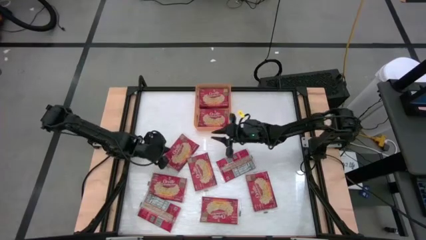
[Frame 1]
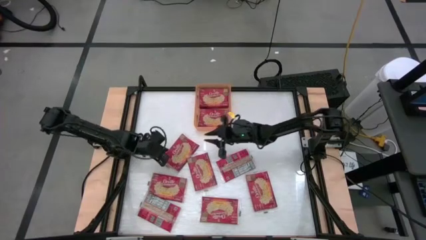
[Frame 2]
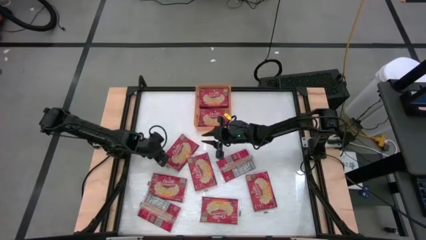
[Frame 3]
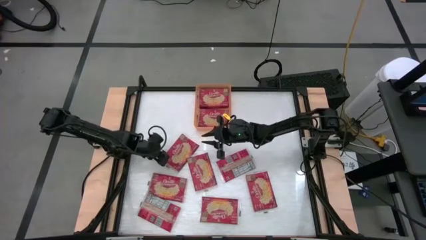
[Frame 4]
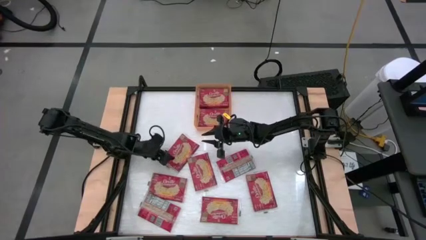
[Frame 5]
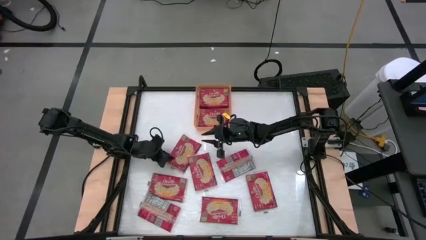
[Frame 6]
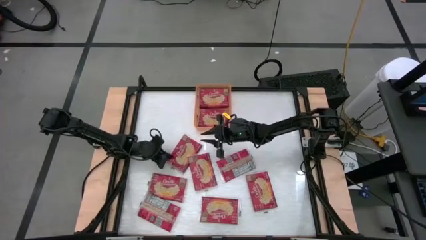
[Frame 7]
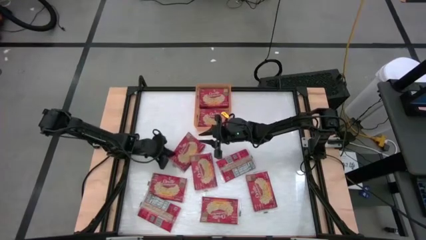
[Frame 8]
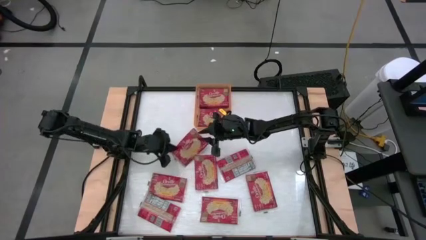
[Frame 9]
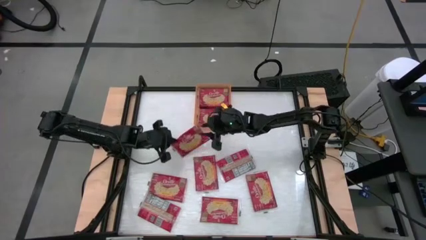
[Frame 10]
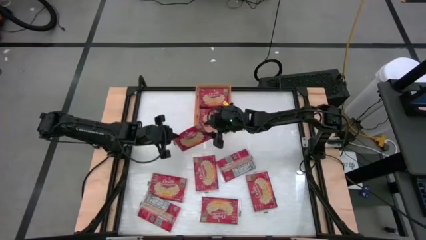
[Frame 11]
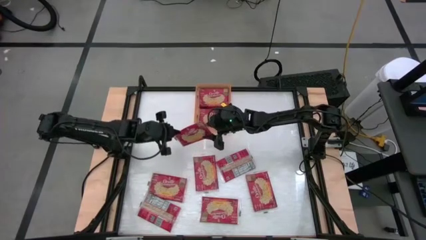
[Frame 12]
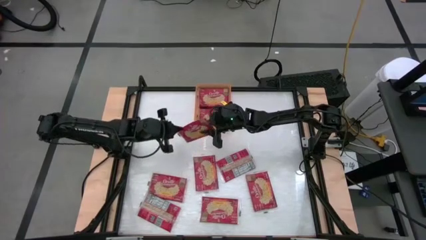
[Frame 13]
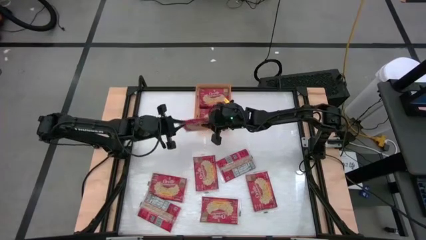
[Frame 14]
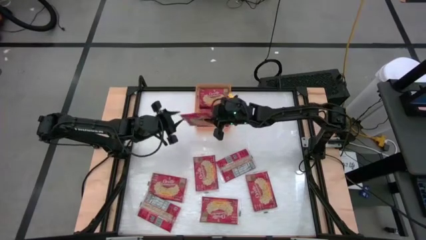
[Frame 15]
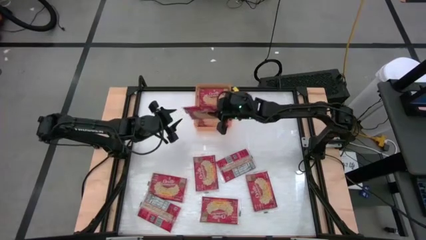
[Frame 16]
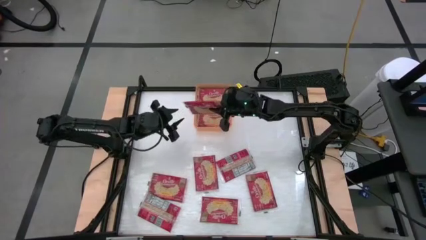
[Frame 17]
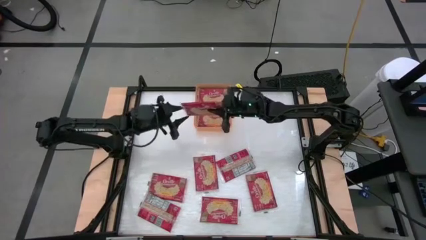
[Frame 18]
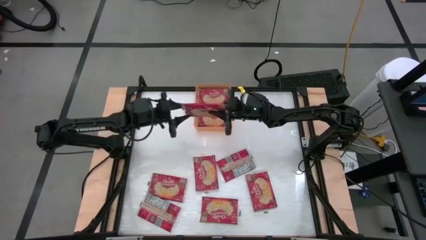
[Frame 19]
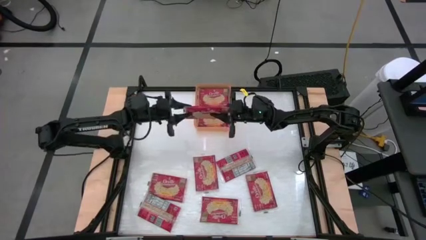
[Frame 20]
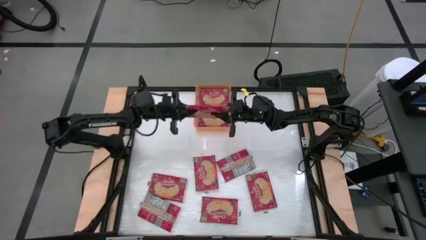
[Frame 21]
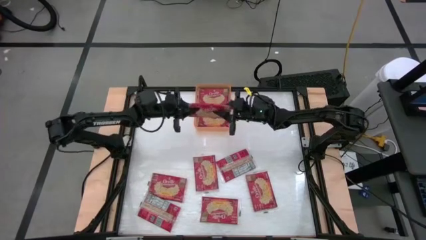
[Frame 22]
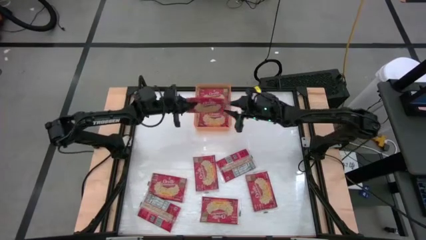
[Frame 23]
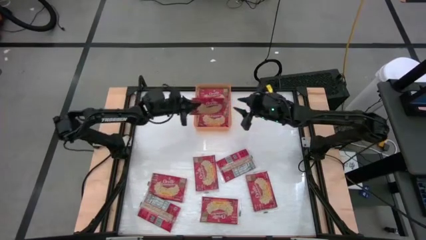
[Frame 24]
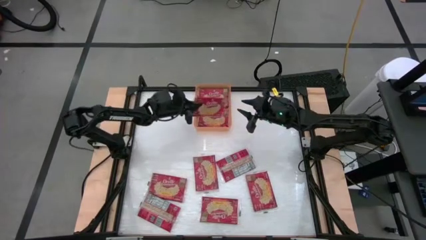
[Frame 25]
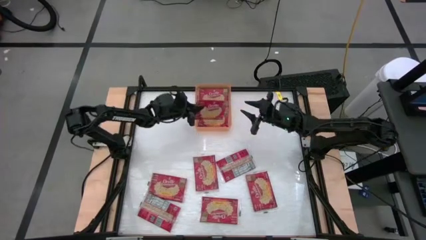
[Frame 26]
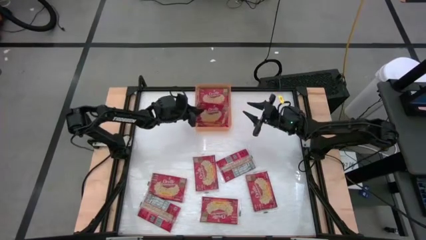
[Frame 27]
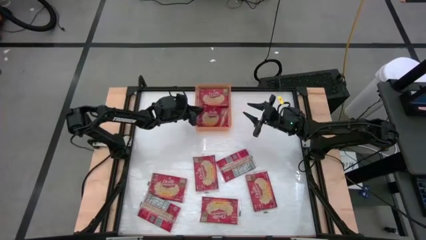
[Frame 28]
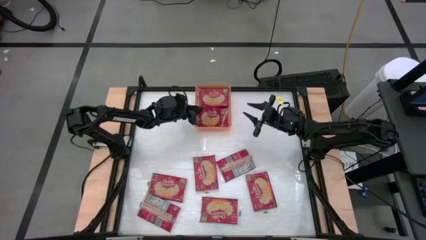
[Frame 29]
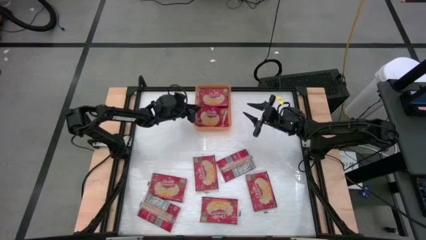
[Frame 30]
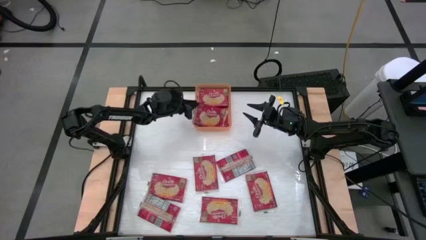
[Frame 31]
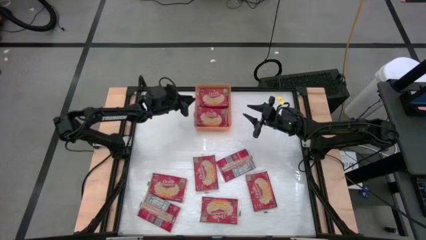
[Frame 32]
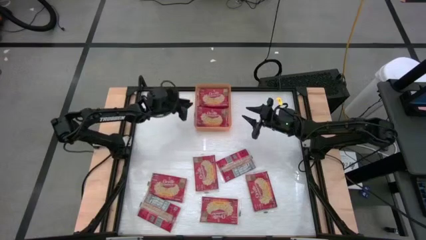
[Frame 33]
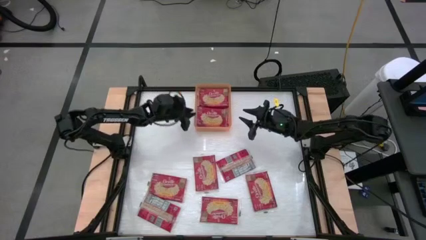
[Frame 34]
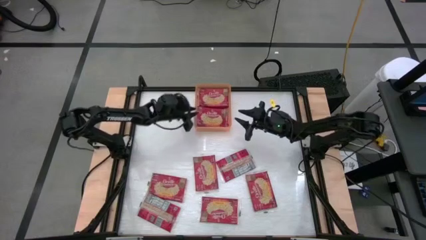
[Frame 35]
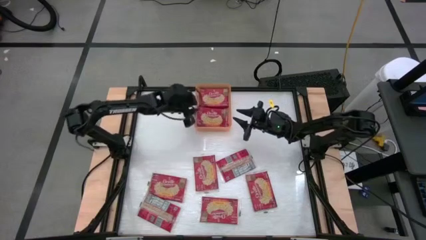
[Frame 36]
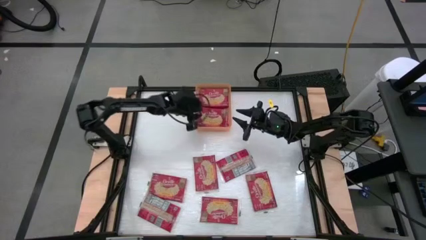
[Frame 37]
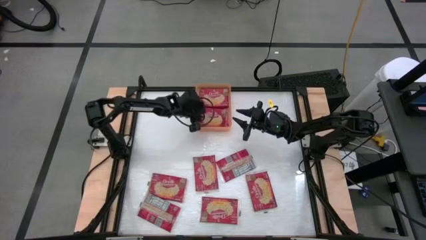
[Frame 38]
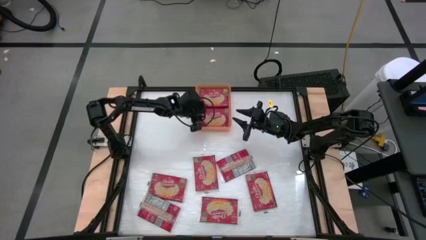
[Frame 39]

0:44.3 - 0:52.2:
Task: Sort popcorn bags into baskets
Put the red popcorn bag into the orange bin

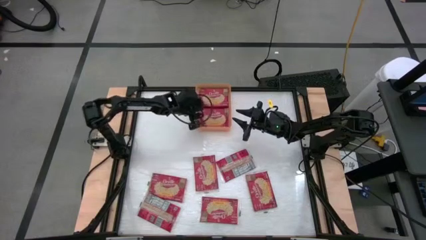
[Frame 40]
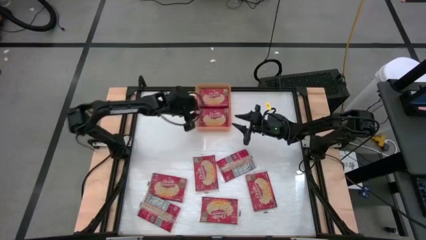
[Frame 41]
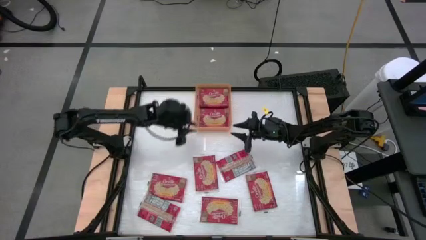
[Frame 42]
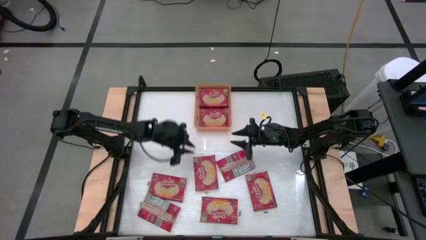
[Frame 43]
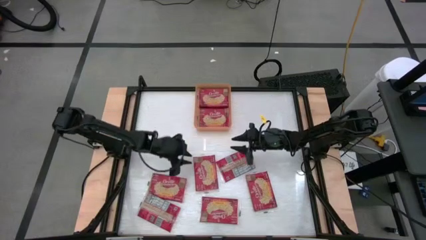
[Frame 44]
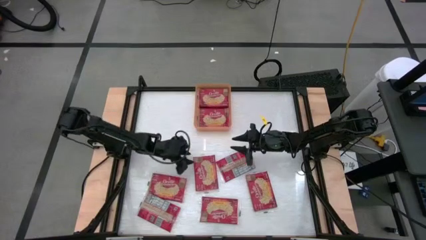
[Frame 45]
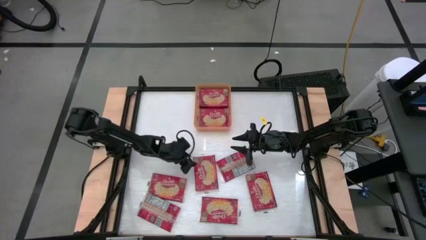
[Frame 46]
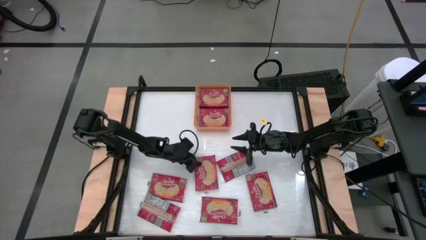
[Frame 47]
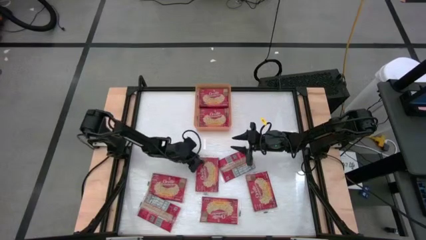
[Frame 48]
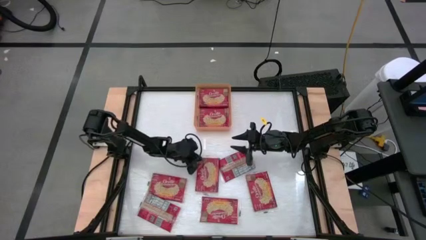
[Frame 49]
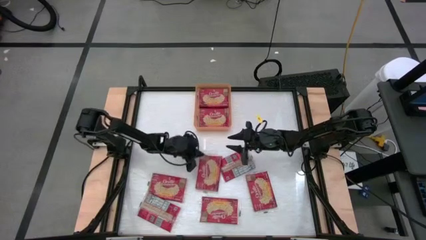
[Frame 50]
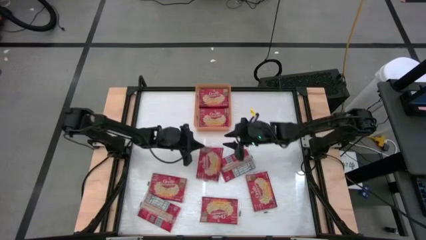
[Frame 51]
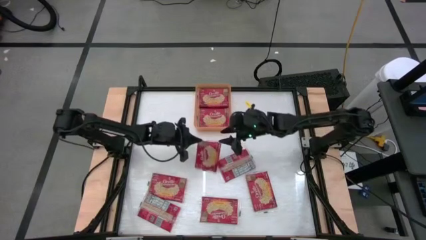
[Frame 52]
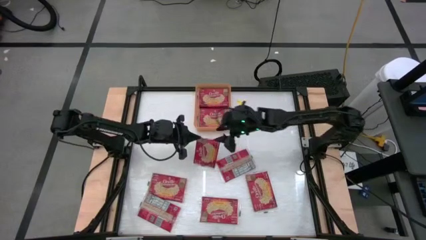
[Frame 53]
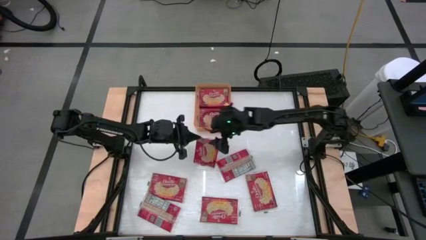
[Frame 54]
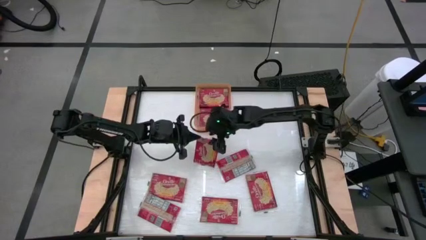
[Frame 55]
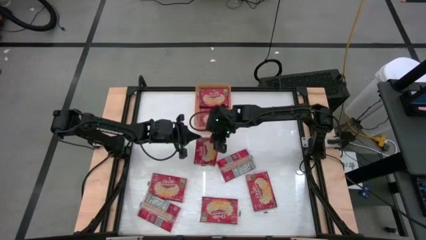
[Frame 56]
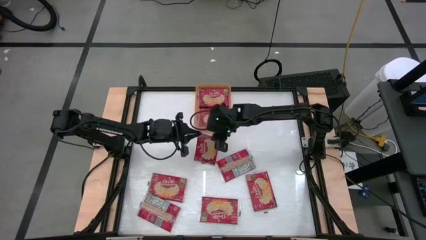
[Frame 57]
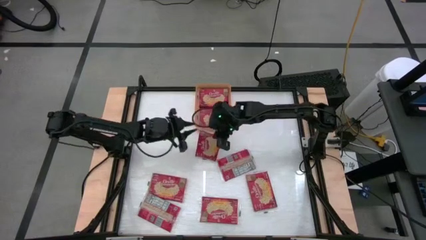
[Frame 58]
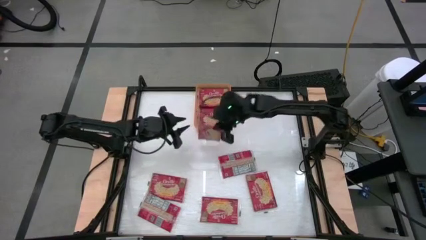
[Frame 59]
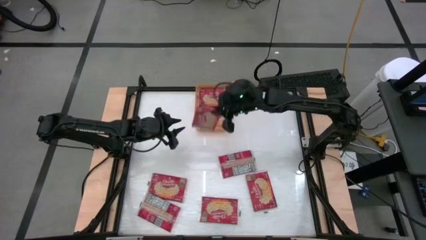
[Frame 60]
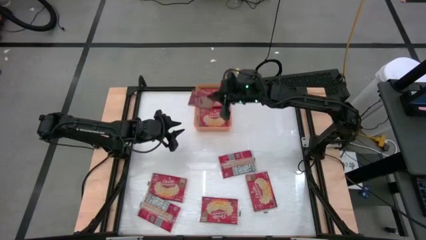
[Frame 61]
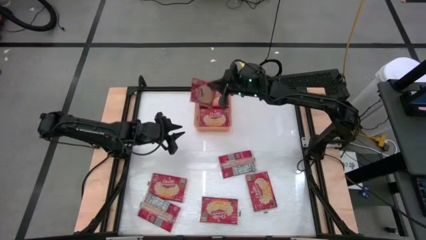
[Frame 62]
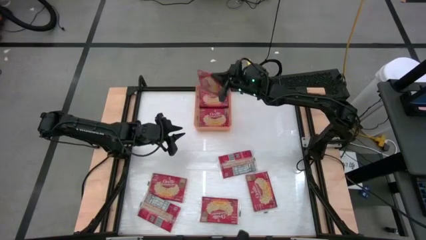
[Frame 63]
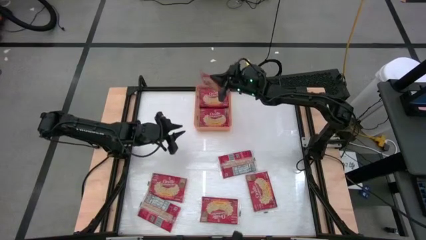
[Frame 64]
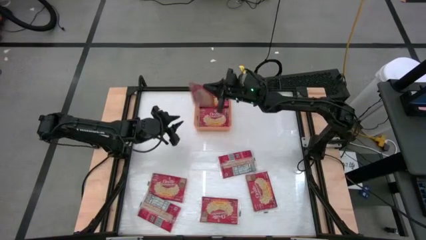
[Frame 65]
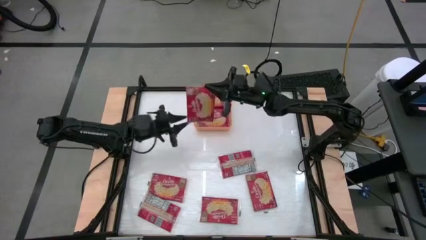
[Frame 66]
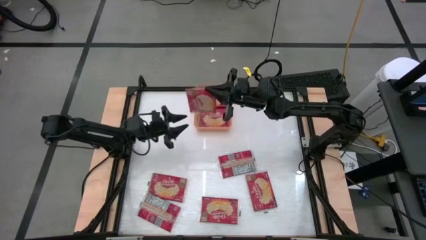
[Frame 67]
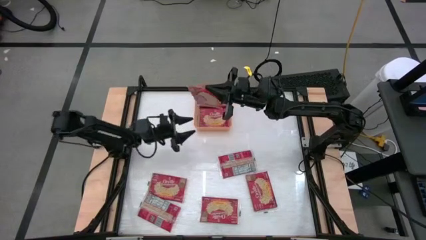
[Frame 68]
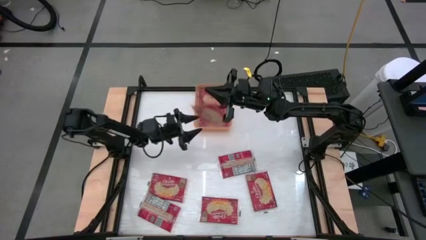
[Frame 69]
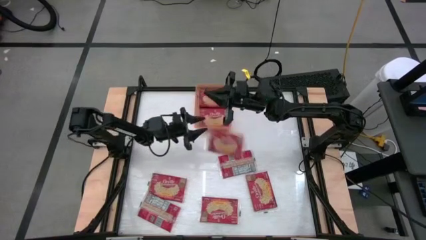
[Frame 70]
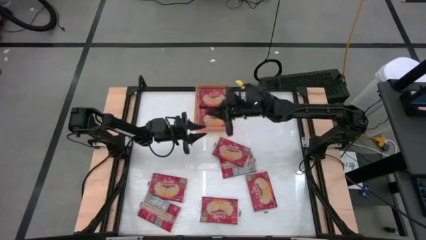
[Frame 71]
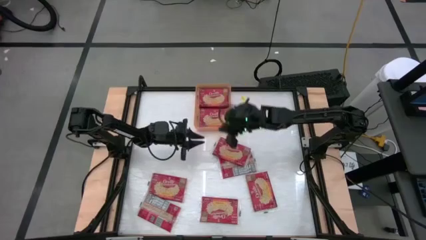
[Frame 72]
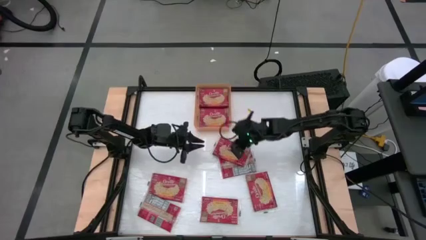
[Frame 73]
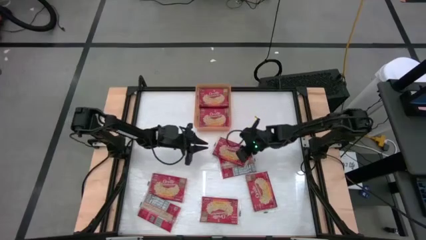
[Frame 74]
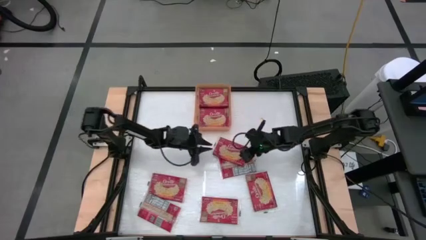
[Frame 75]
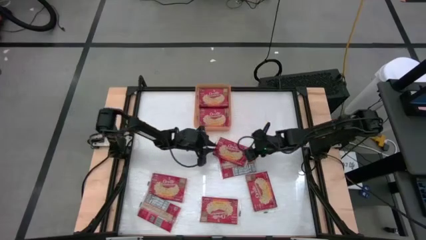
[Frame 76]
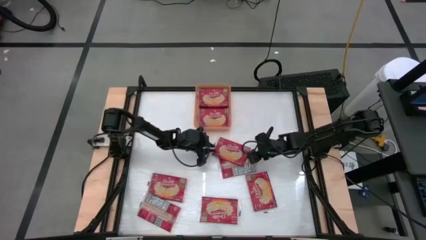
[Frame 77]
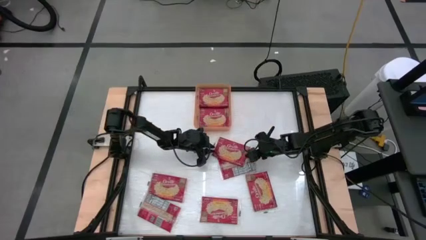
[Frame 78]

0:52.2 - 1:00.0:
Put the red popcorn bag into the orange bin

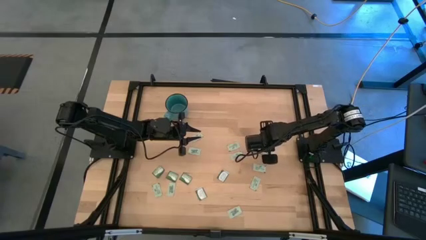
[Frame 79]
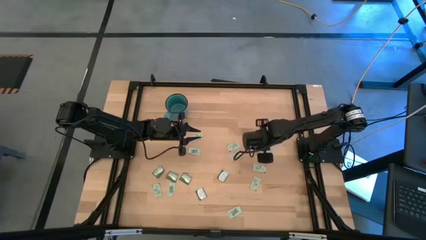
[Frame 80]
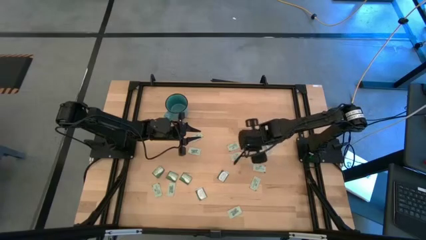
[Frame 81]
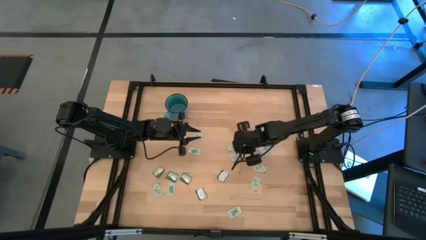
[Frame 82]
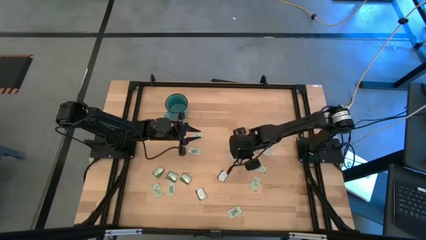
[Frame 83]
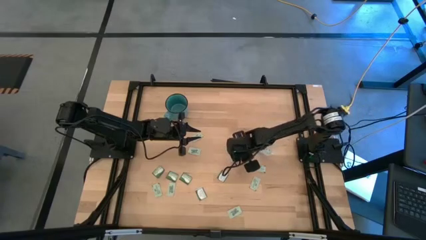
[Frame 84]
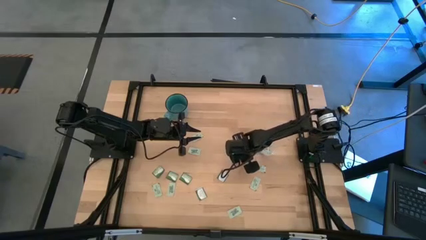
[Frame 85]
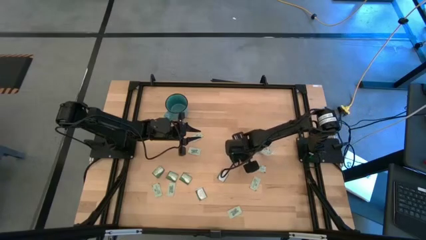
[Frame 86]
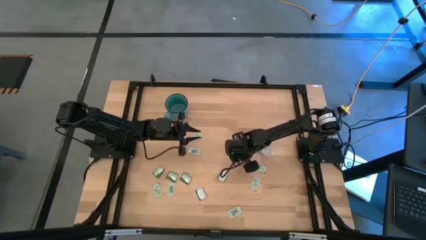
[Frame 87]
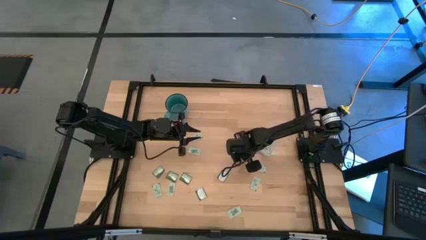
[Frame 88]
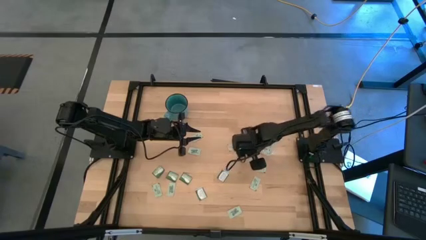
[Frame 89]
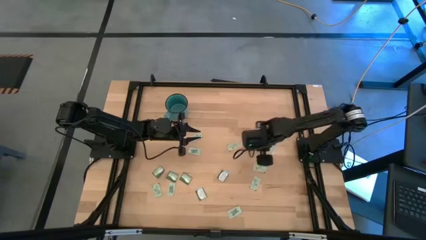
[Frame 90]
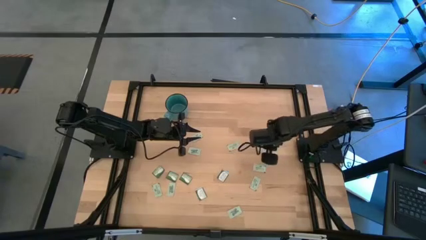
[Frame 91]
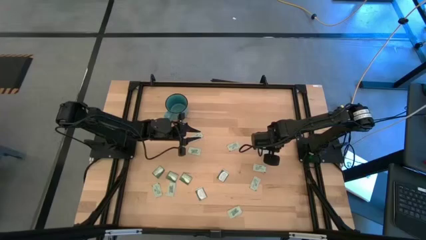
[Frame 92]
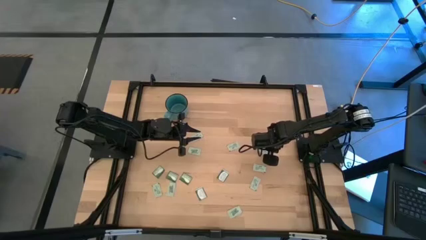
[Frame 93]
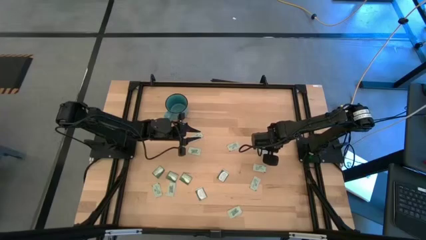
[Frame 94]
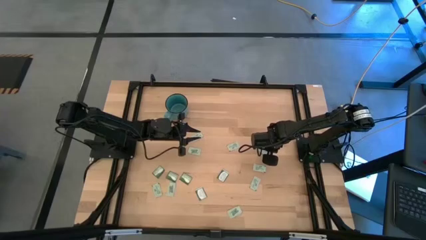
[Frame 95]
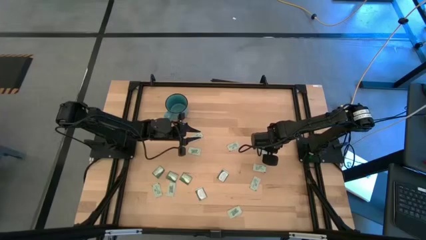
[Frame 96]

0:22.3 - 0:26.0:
Task: Pick and place Stevia / Truvia into bins
Put the stevia packet into the transparent bin
